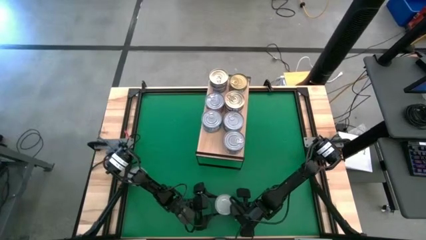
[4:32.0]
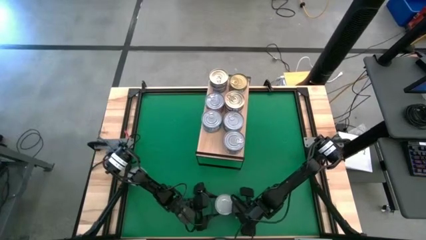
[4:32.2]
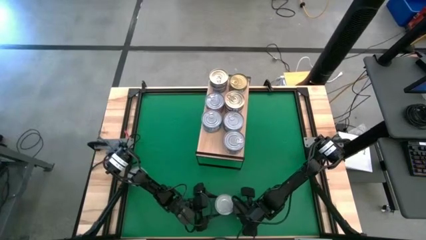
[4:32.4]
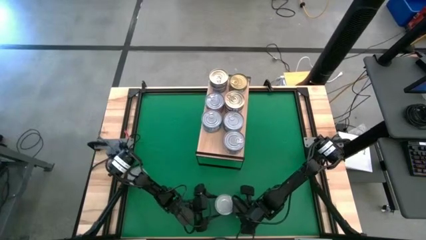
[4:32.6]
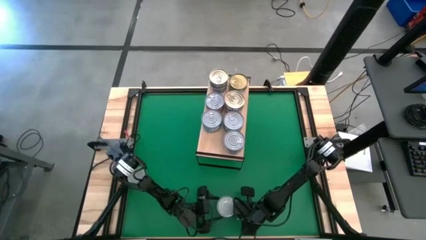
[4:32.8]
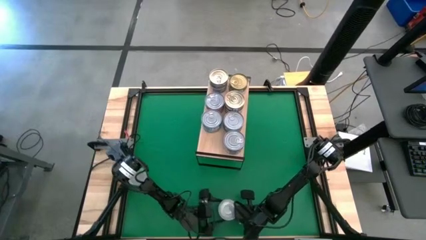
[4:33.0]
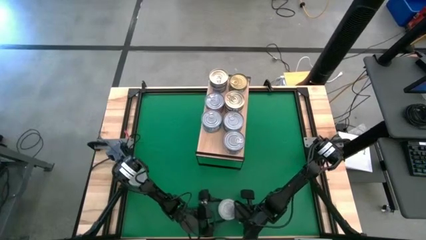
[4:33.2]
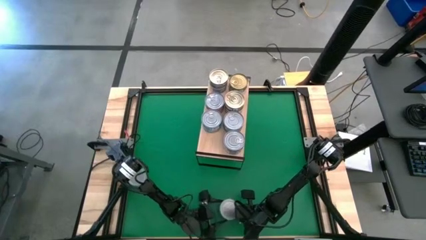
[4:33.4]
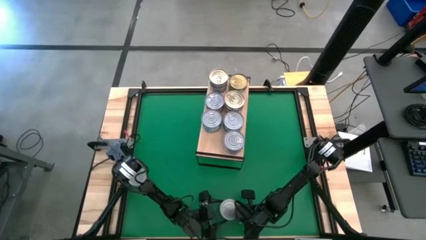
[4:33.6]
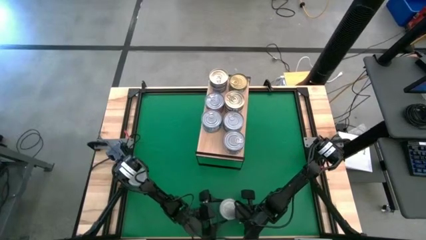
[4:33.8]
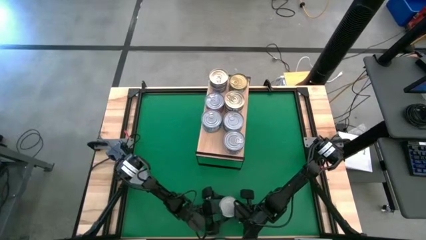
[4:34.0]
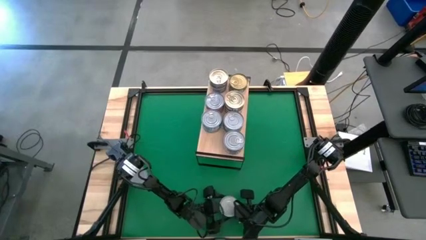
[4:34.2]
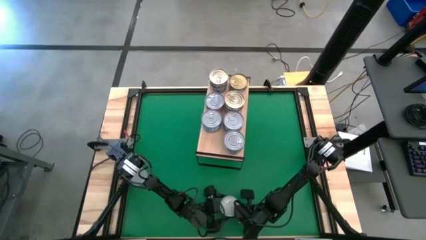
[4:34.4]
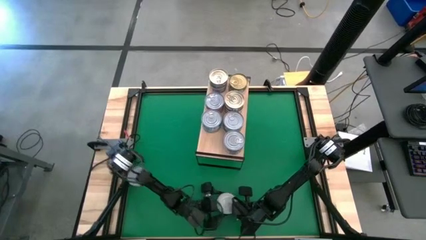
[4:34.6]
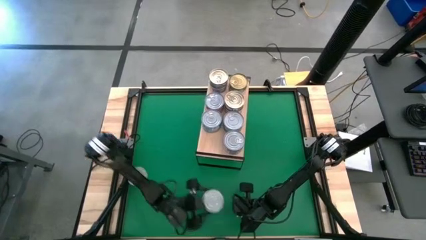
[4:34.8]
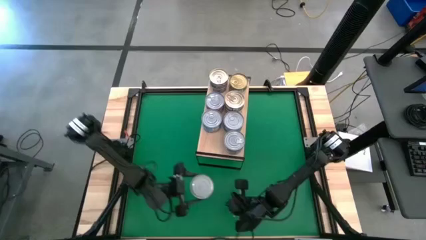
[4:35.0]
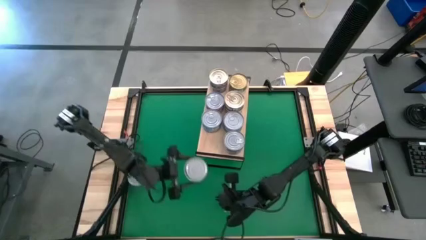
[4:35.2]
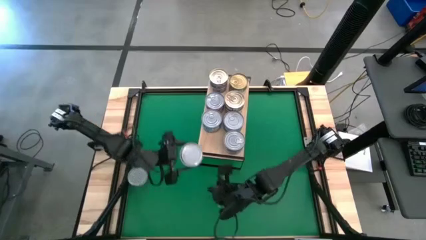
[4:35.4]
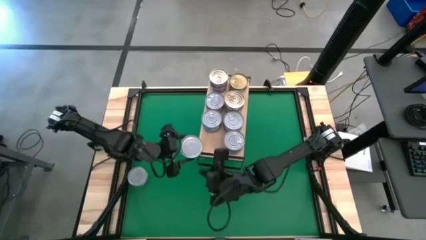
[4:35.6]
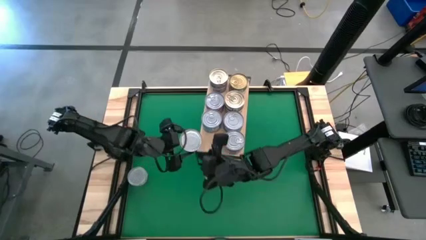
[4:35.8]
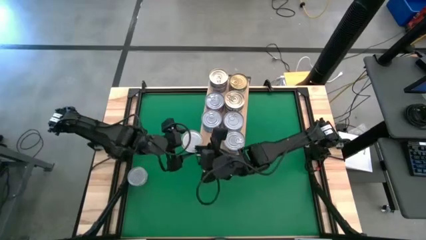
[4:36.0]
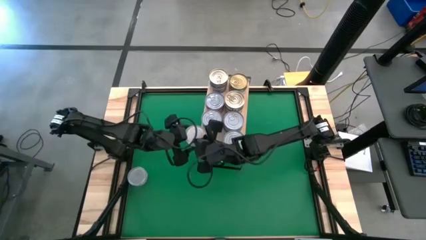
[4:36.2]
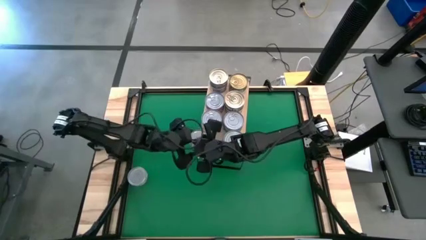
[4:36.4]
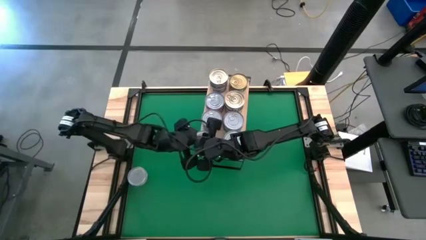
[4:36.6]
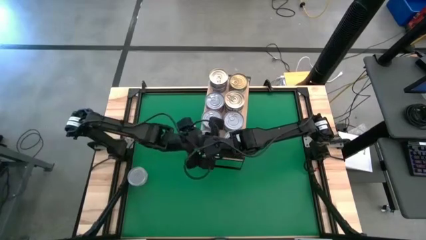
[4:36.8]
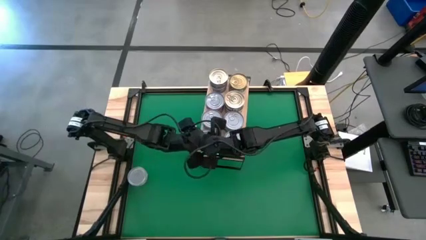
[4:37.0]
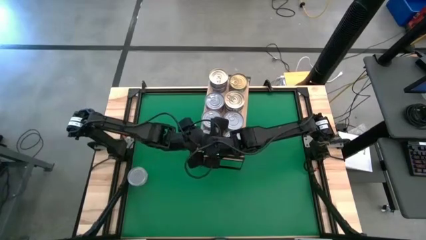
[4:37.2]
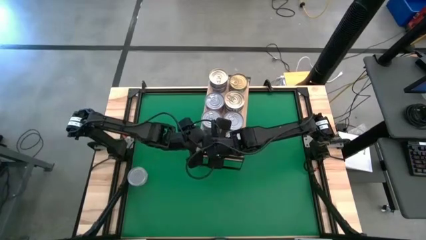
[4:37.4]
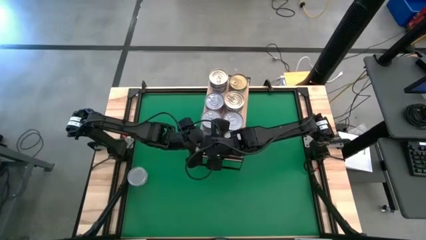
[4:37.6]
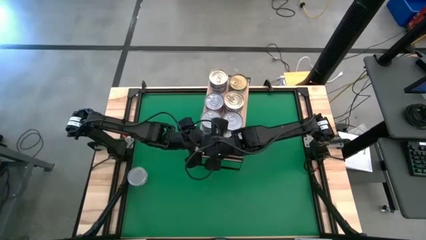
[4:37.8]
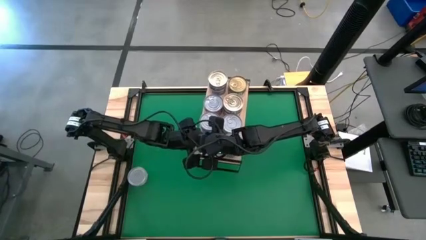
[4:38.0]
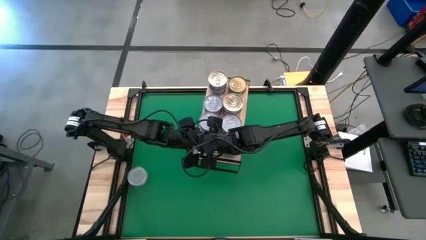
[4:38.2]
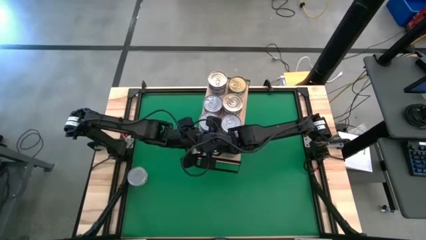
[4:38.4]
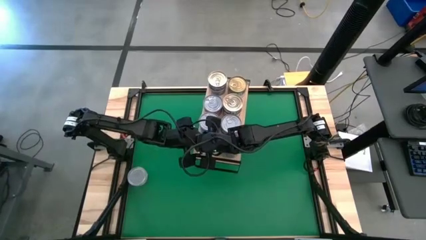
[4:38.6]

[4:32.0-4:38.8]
Task: Stack canned seafood by type on shelf
Put the green tuna can on the shelf

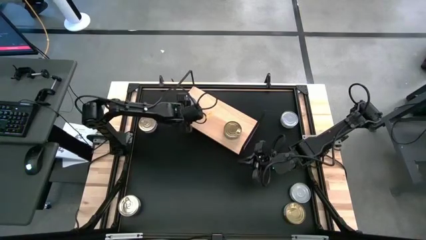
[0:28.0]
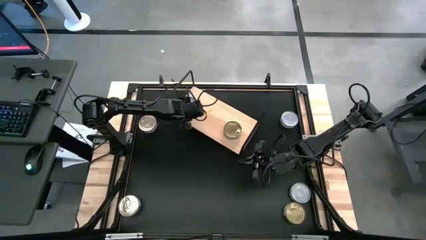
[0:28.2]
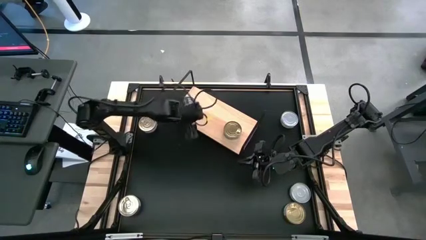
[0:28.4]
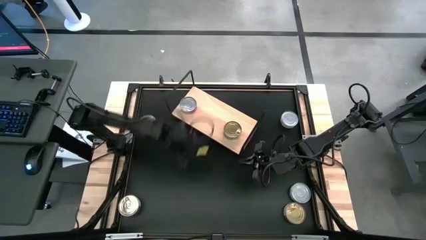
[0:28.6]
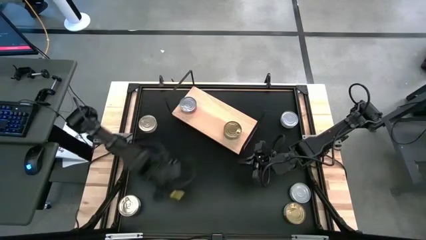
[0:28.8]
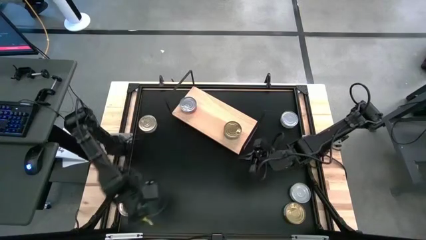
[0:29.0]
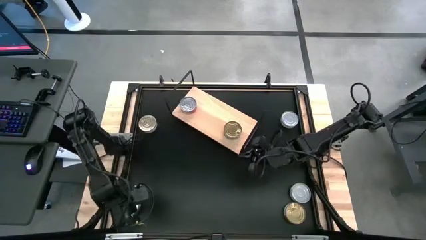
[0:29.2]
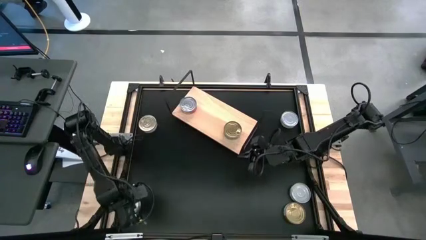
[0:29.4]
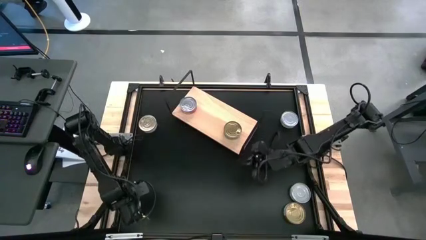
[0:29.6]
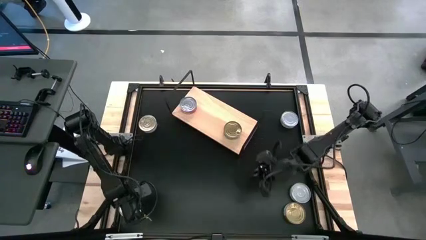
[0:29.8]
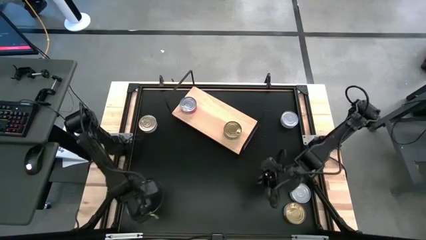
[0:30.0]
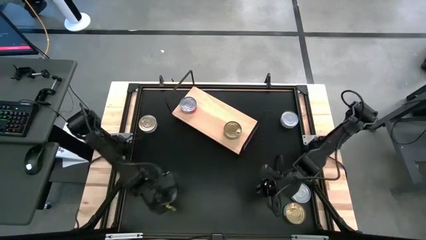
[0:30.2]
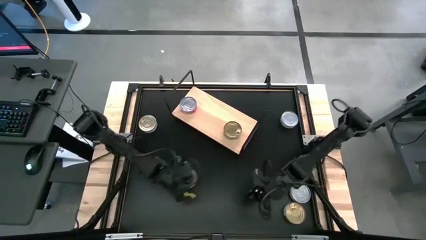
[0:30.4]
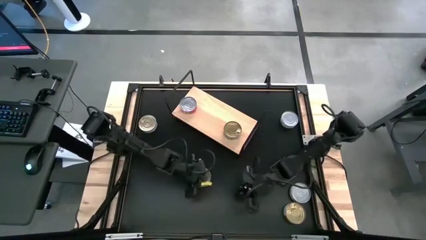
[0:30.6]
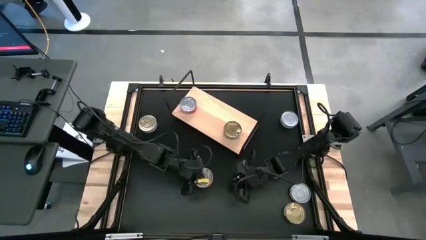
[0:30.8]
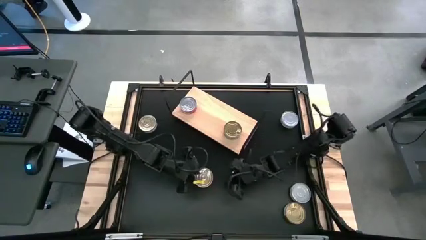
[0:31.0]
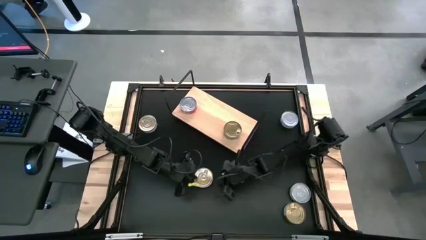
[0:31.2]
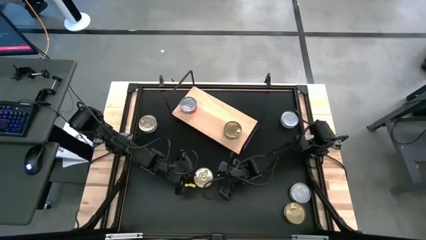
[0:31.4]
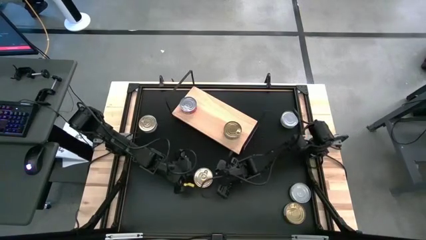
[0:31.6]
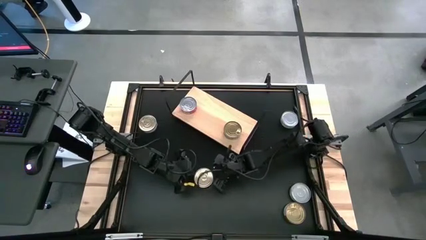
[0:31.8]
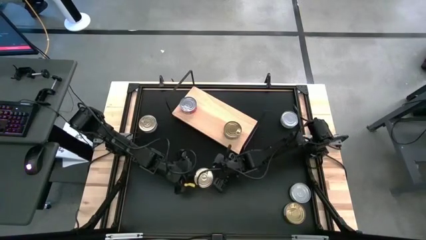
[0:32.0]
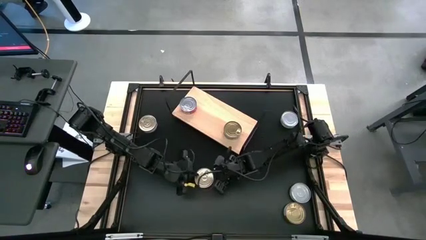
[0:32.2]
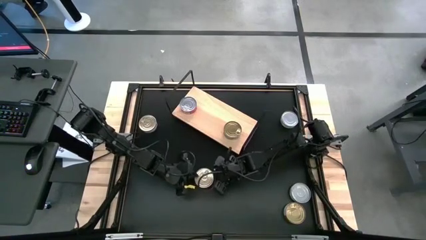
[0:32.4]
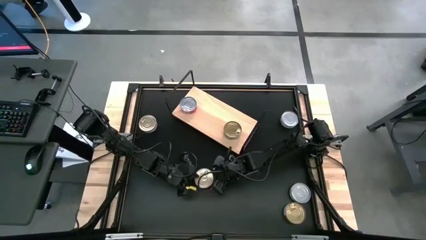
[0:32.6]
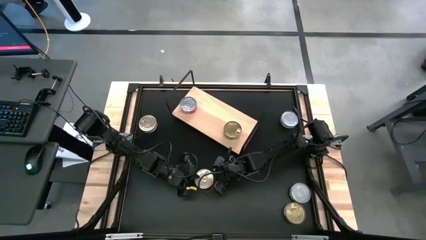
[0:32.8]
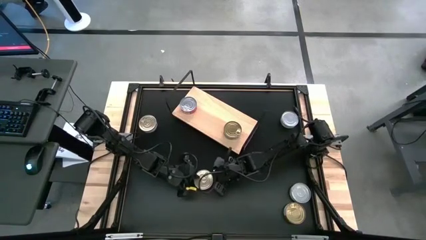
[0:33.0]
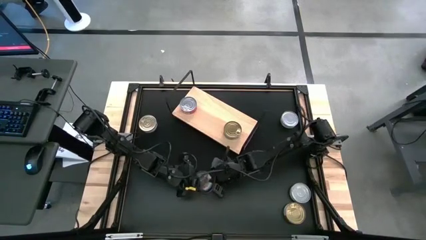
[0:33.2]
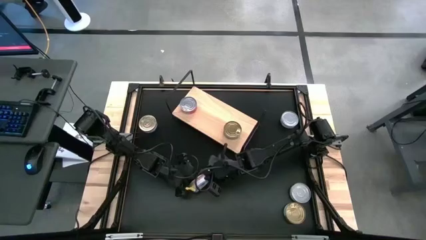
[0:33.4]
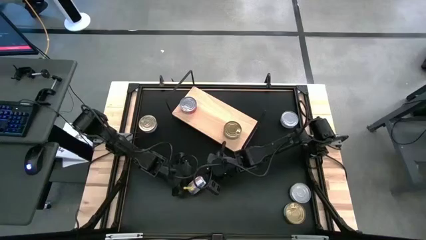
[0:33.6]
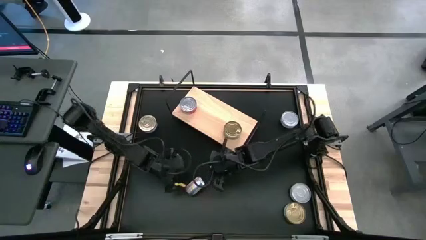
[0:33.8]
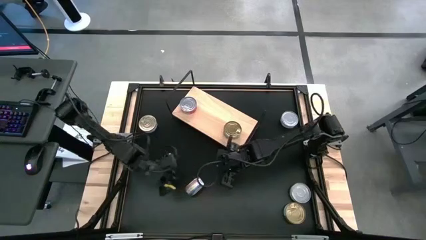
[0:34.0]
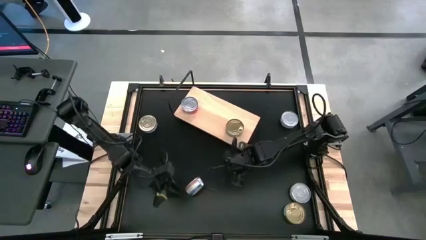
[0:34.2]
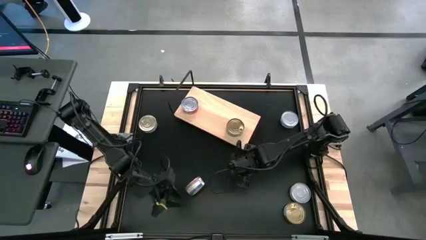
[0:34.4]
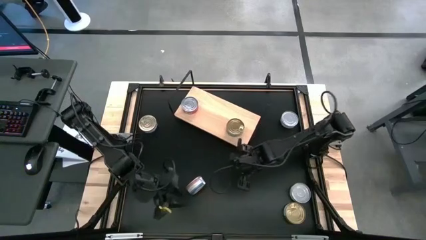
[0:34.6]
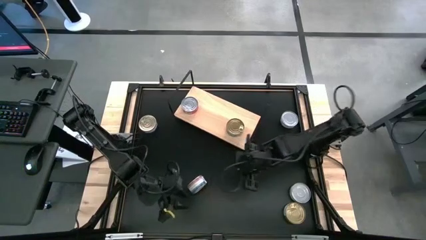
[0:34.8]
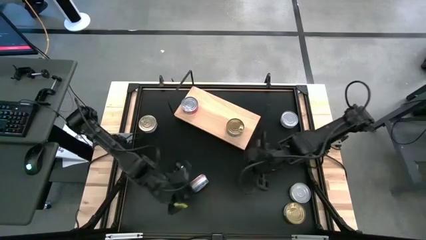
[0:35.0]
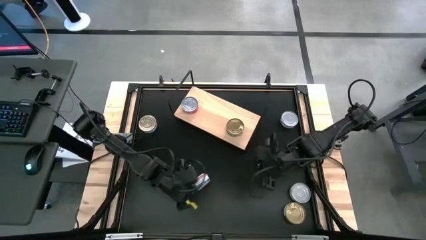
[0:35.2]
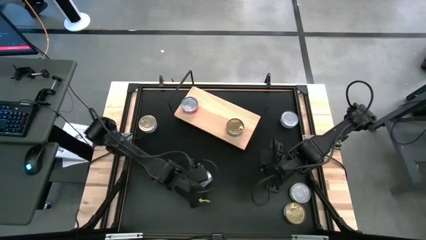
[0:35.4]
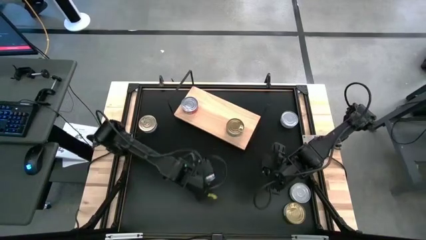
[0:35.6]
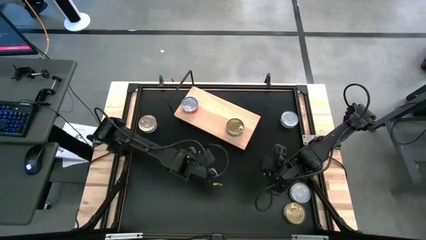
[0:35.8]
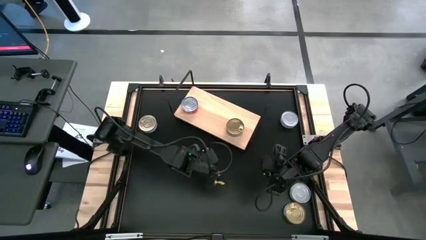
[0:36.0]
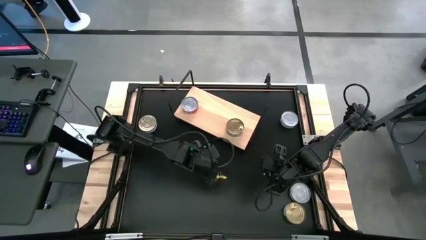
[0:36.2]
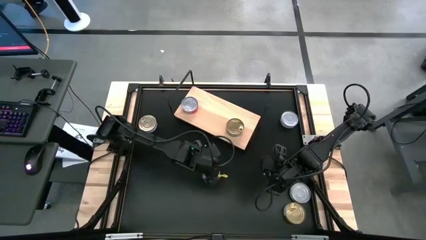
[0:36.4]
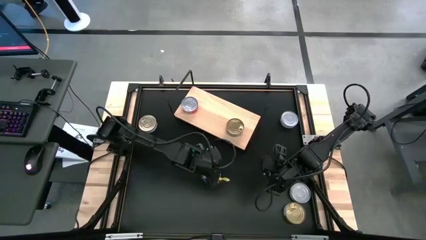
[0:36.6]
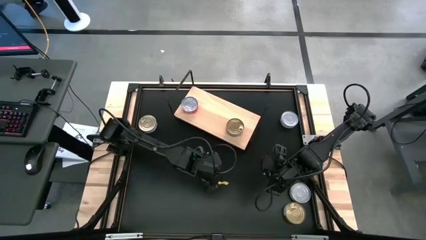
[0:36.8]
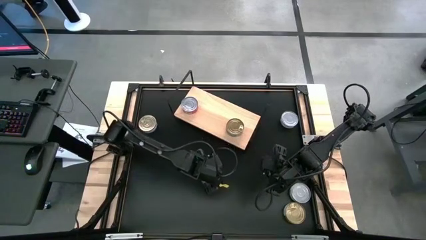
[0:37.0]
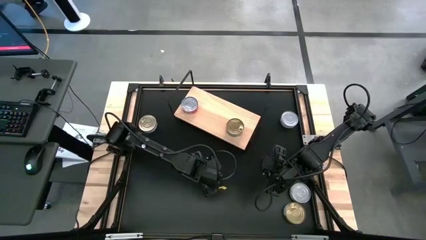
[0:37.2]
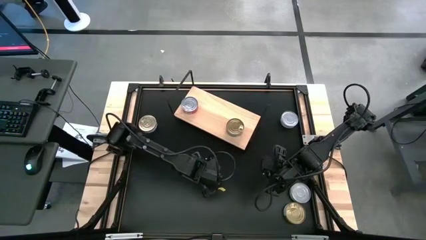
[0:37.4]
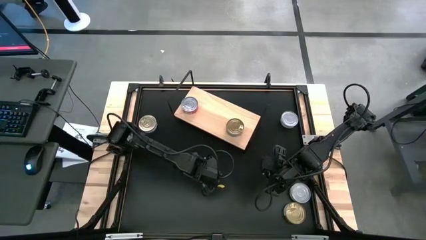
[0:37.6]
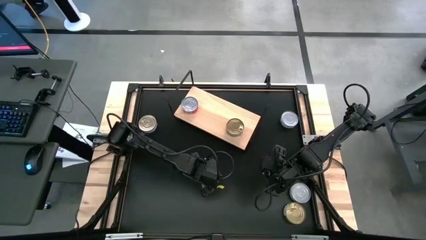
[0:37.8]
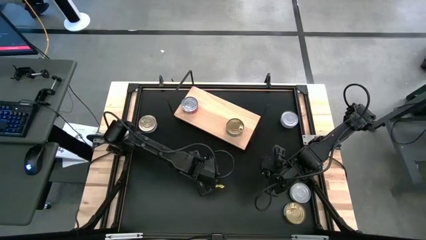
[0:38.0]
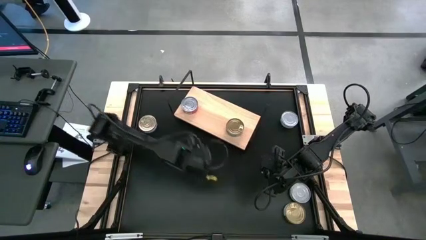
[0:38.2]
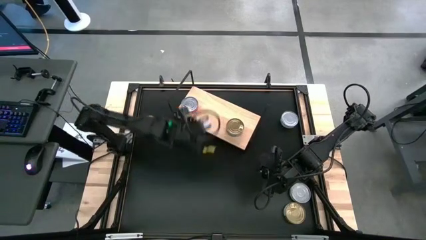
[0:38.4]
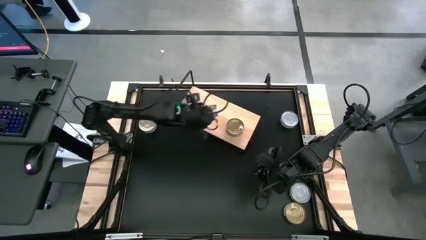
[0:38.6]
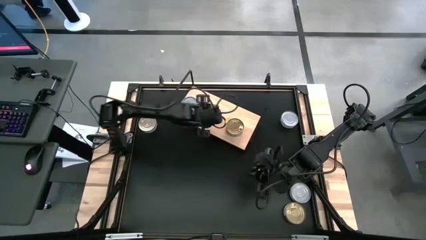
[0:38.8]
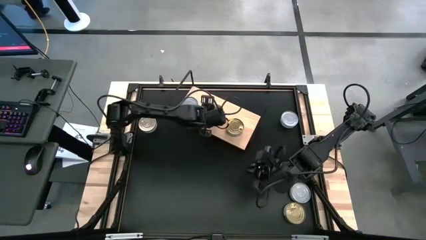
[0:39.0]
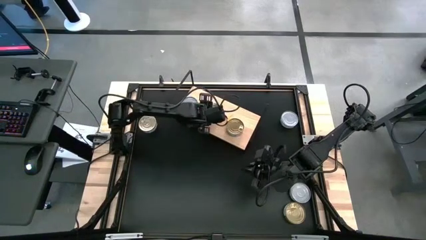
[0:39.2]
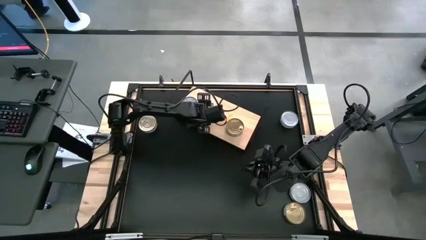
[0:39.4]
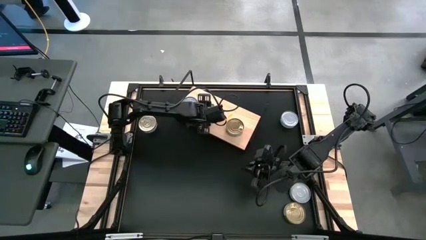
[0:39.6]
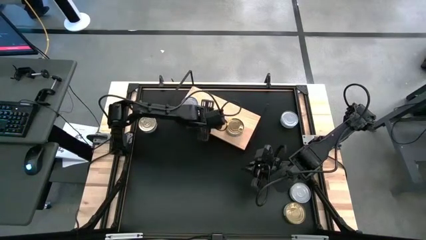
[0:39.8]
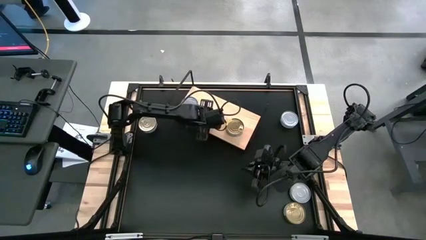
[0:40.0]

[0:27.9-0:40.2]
Task: Stack canned seafood by type on shelf
Put the bottom blue and pink tuna can on the shelf
